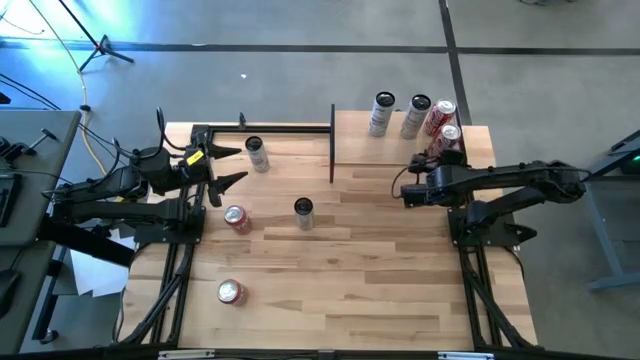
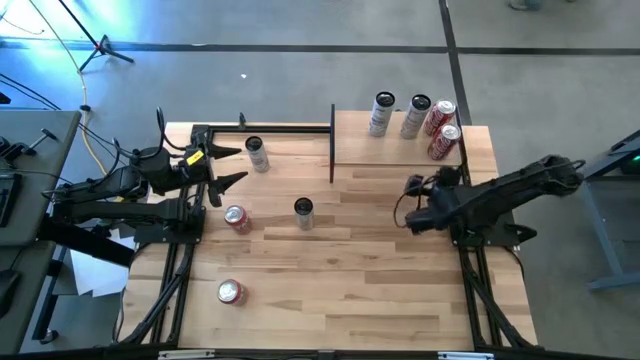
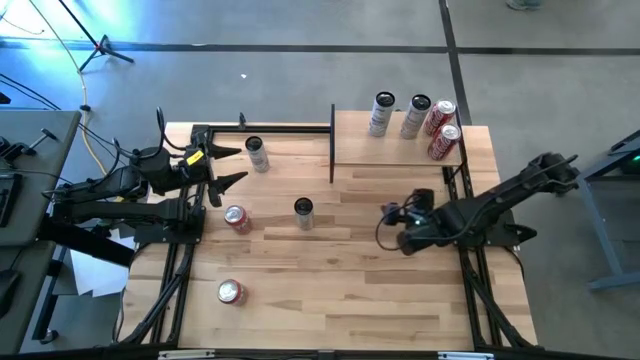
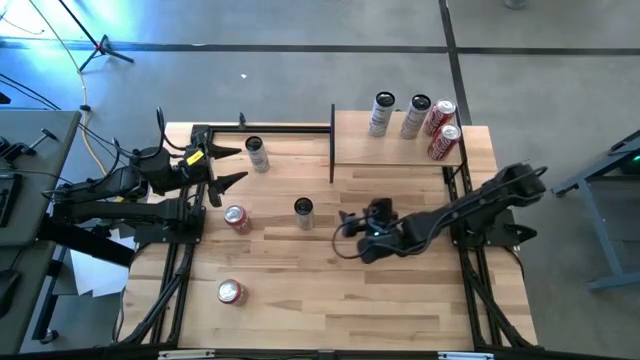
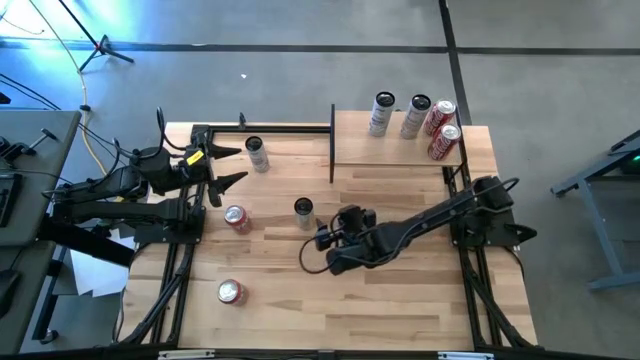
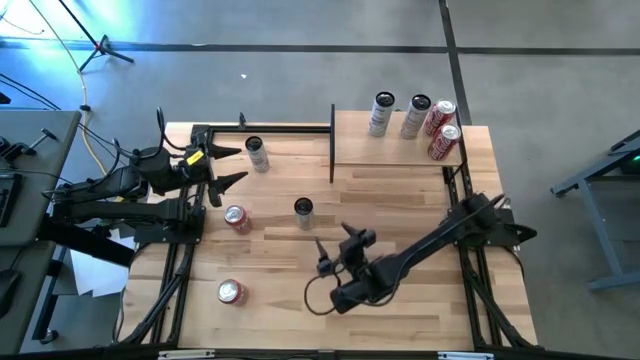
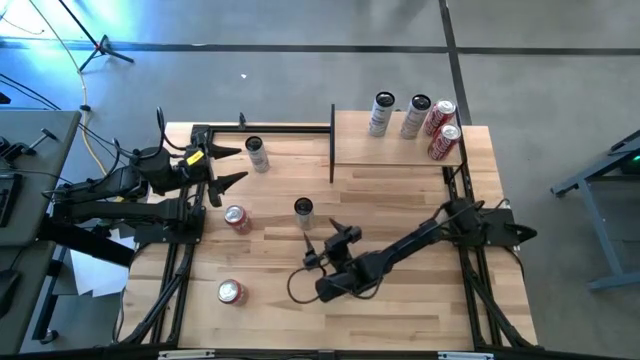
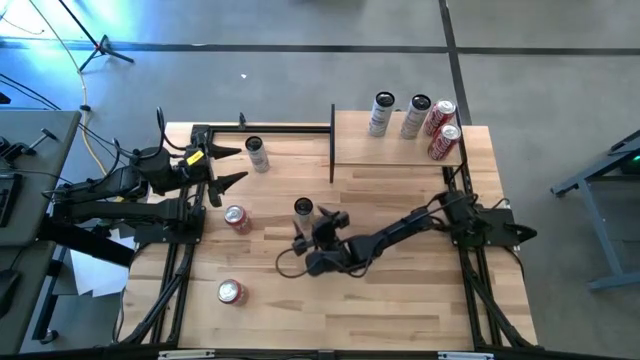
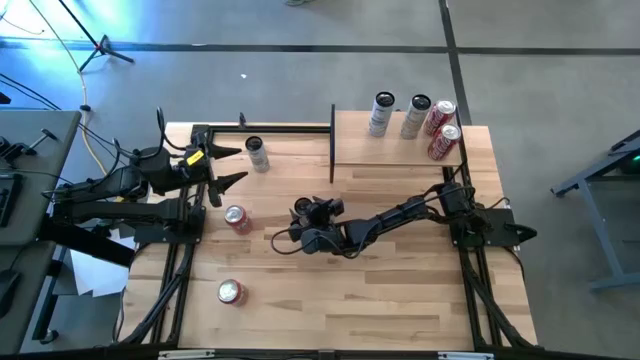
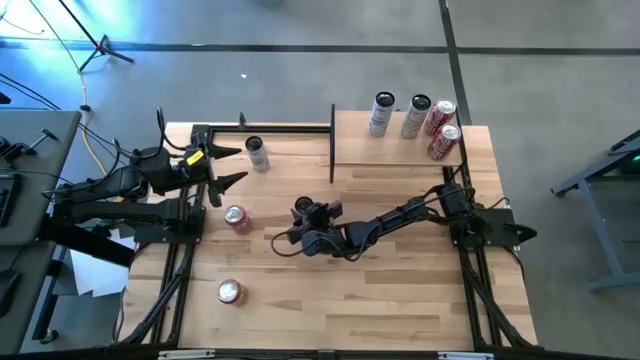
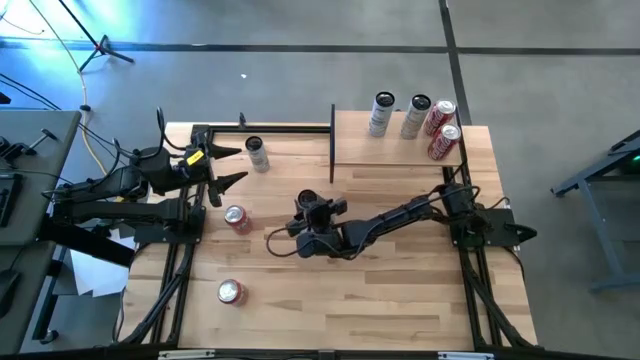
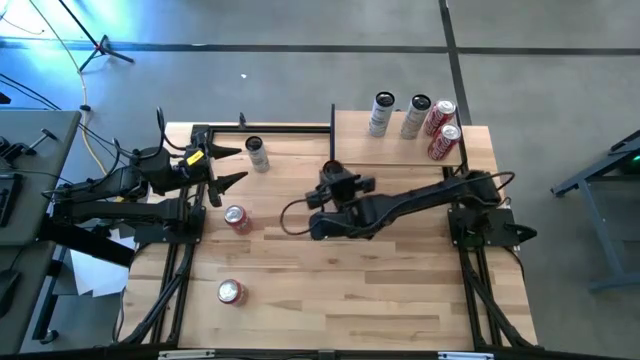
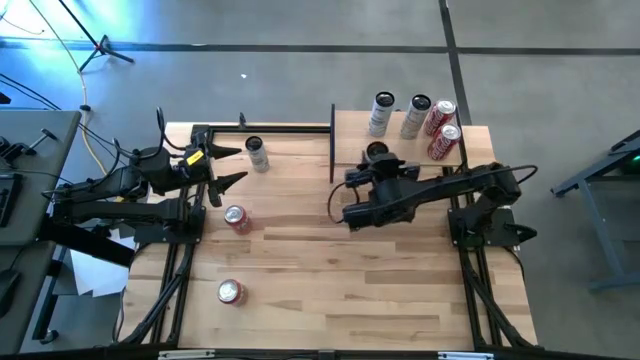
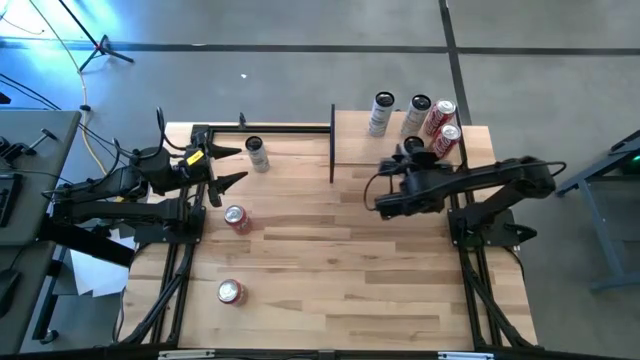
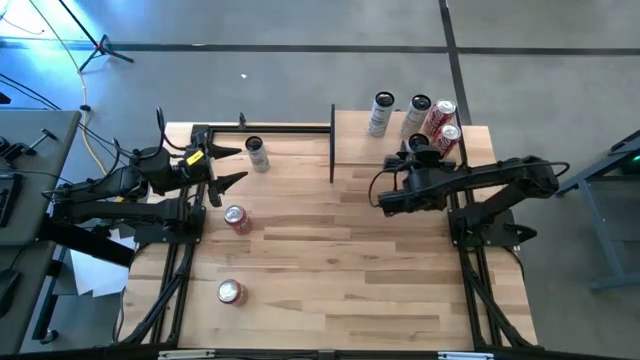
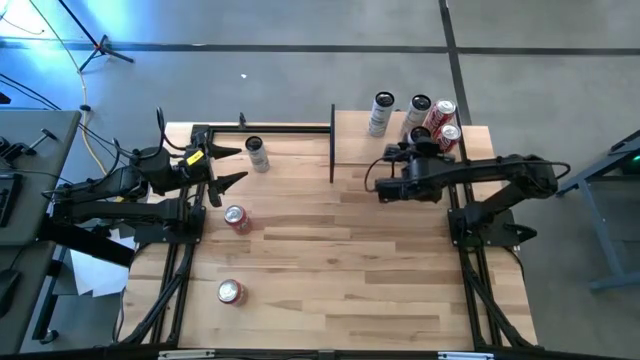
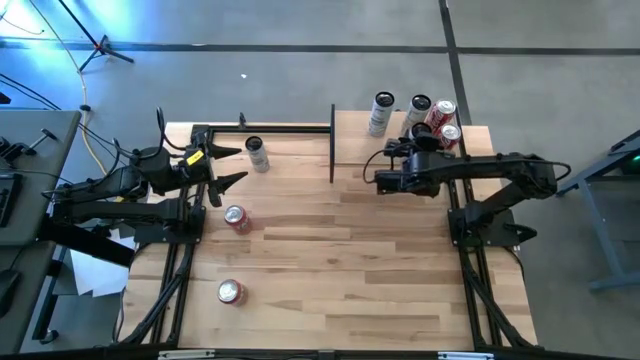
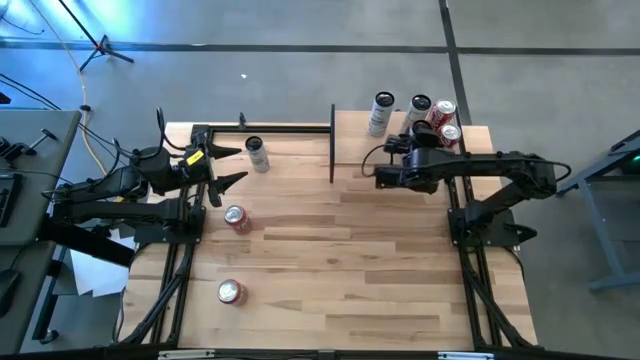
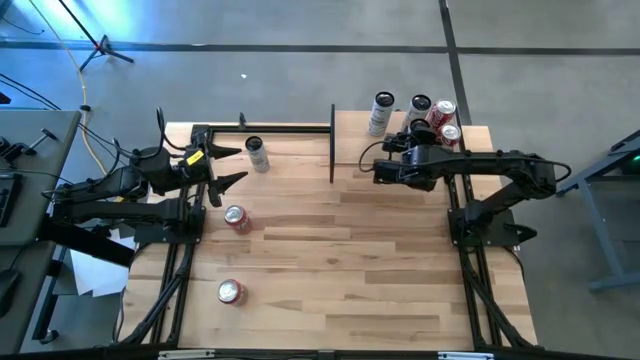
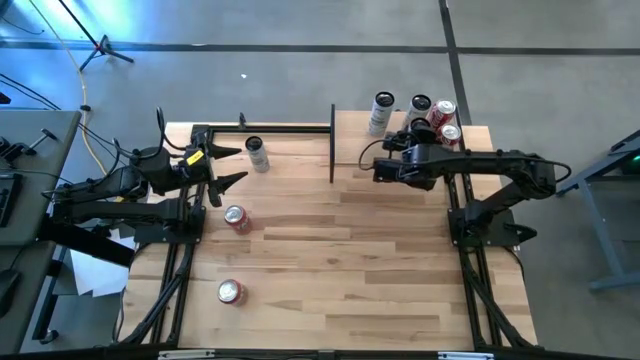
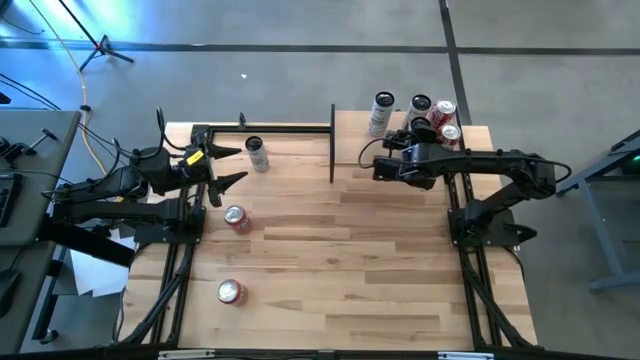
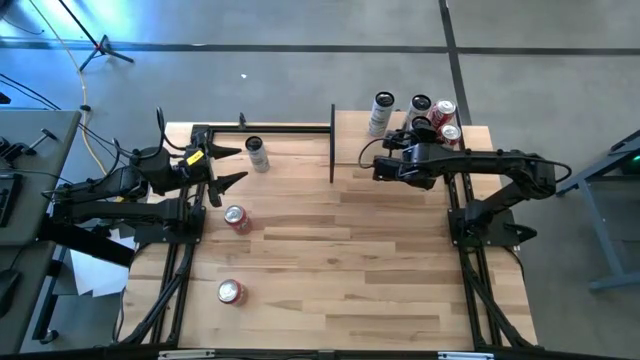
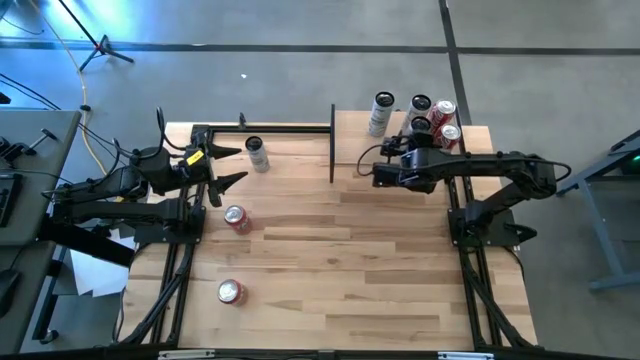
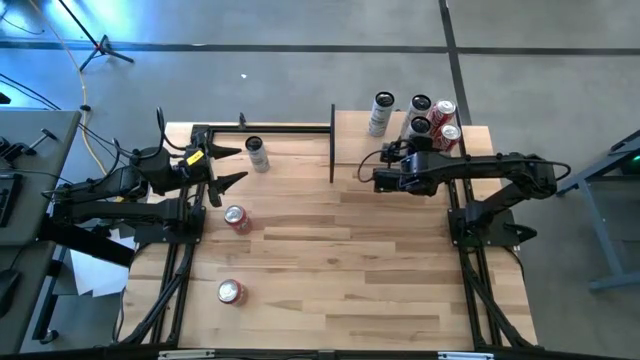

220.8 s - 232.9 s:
Task: Place canned beverage on shelf
Put the white soda can on the shelf aligned with the other white soda can

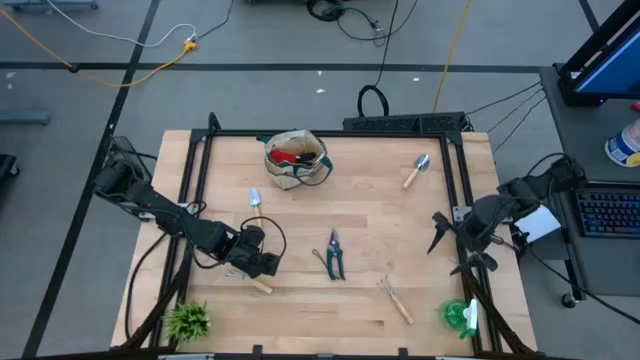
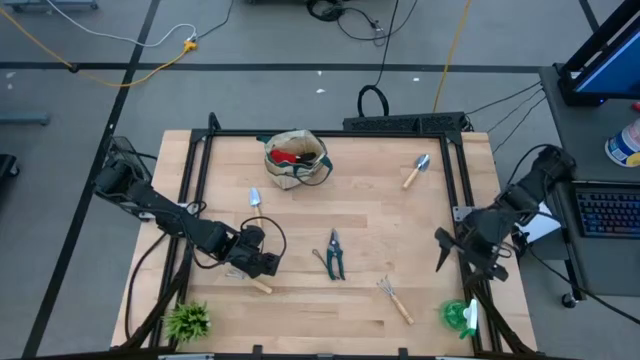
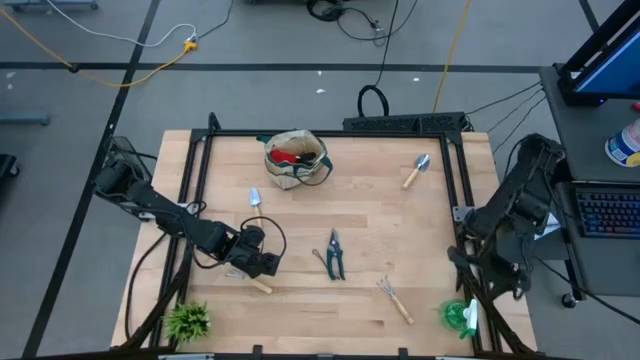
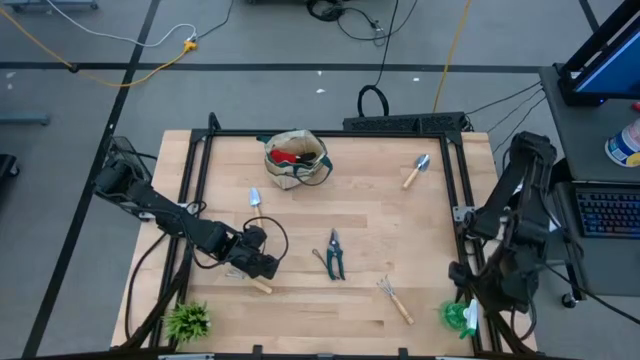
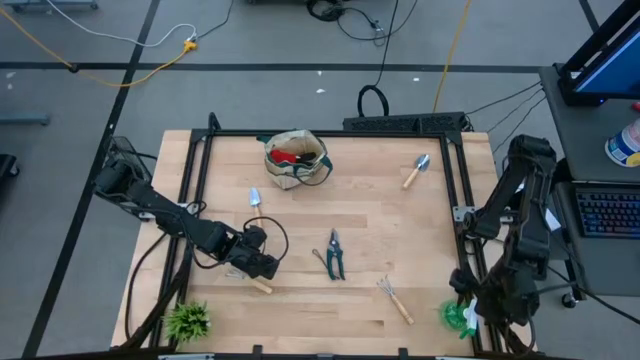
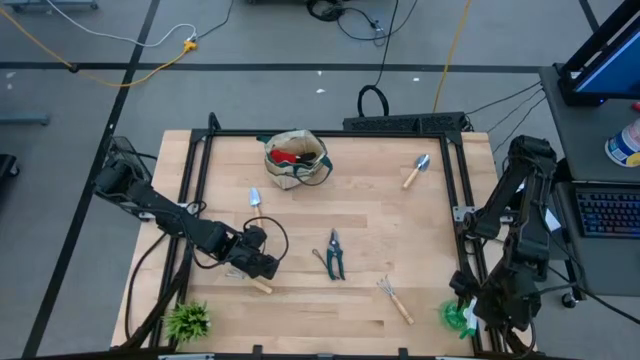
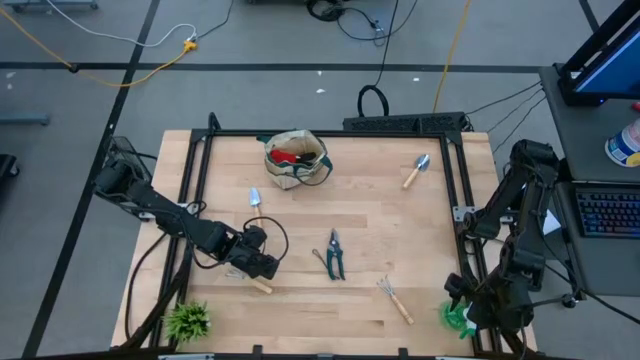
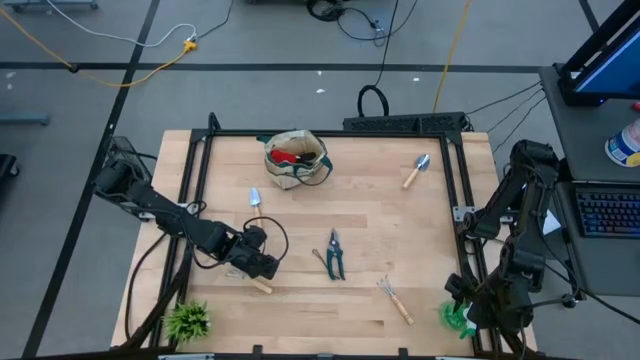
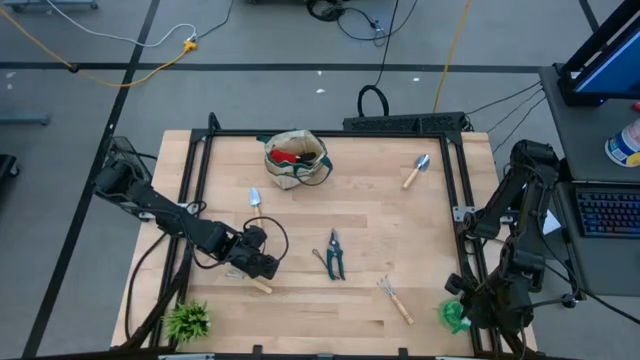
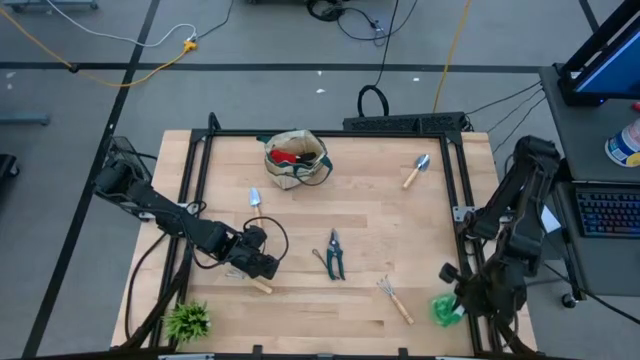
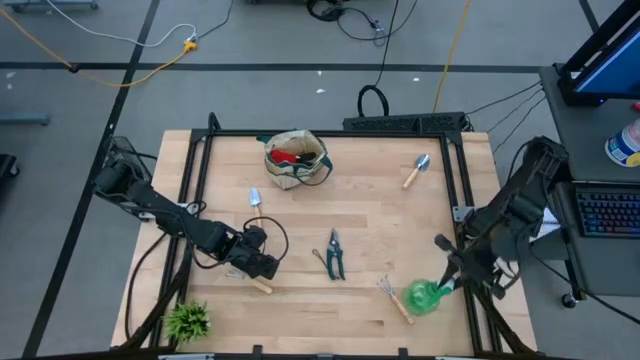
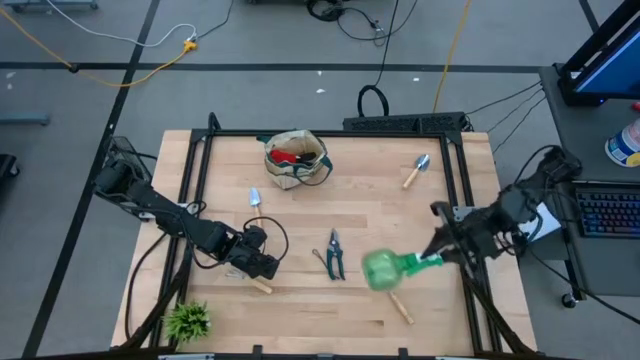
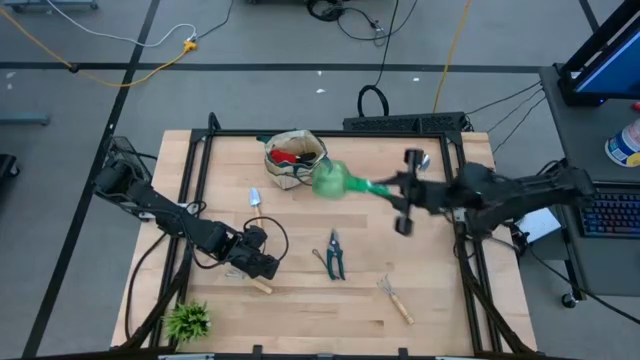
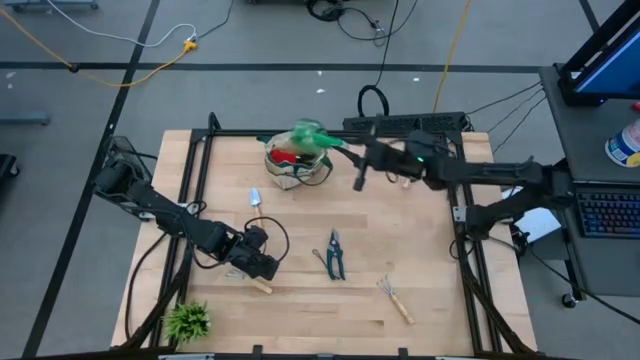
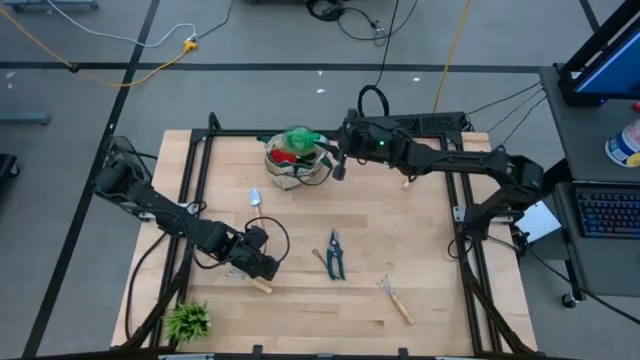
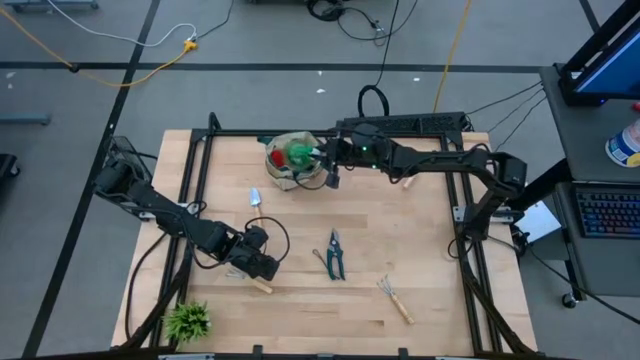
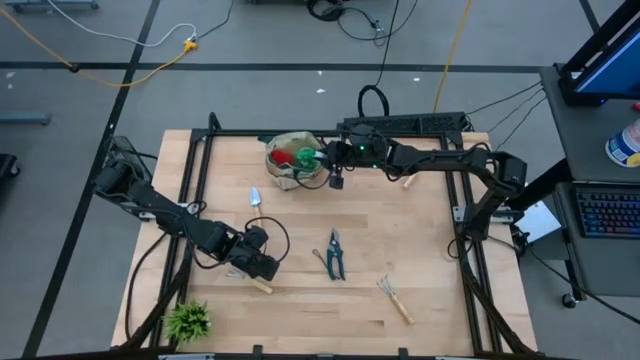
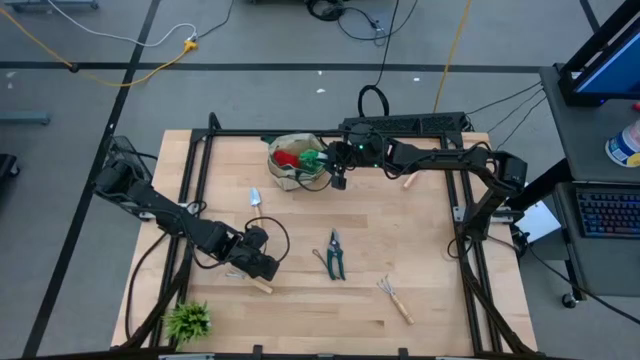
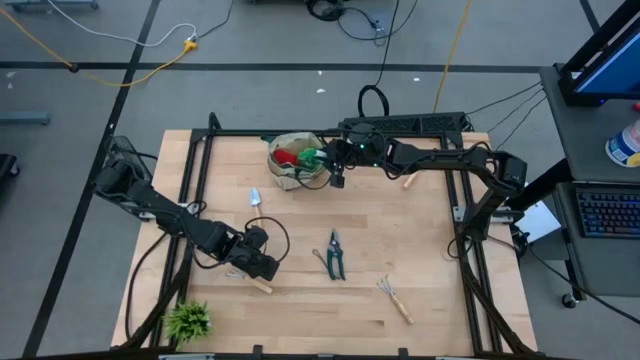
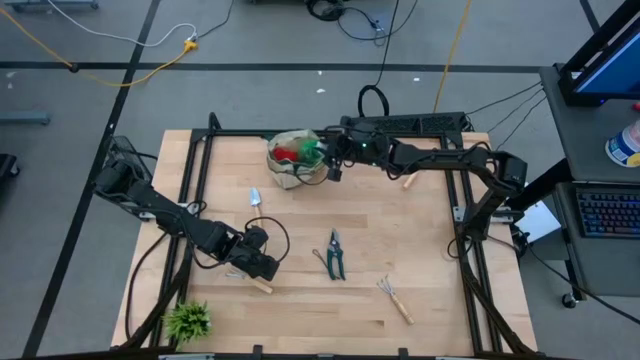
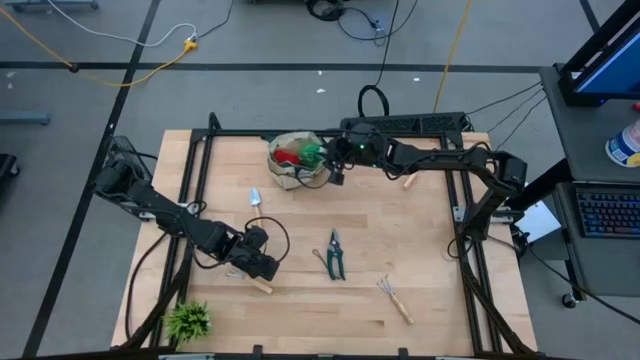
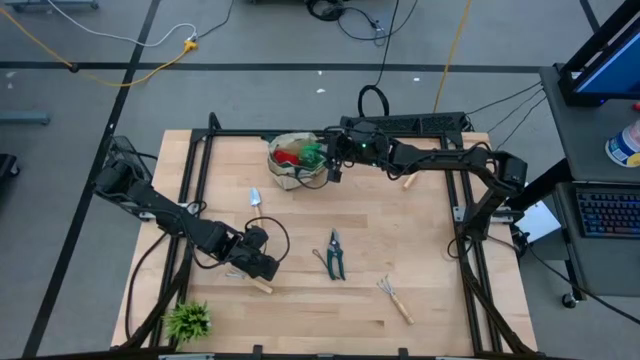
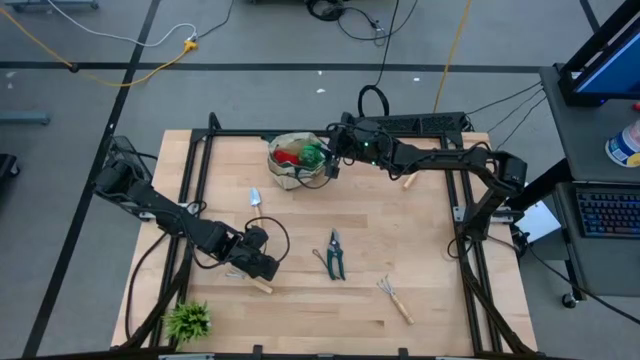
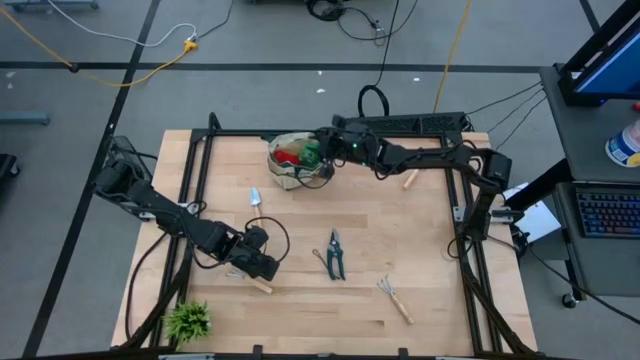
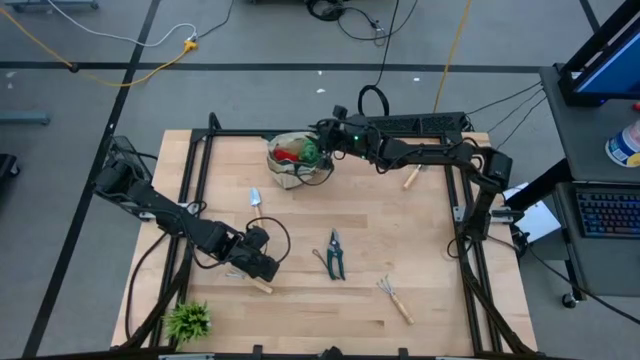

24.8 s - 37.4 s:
Task: Pick & Place Garden tools in Gardening bag
Put the spray bottle into the gardening bag
